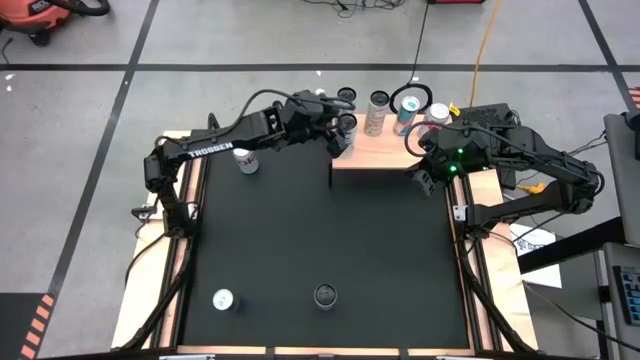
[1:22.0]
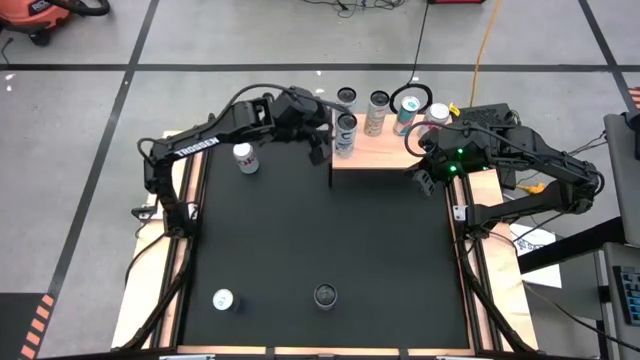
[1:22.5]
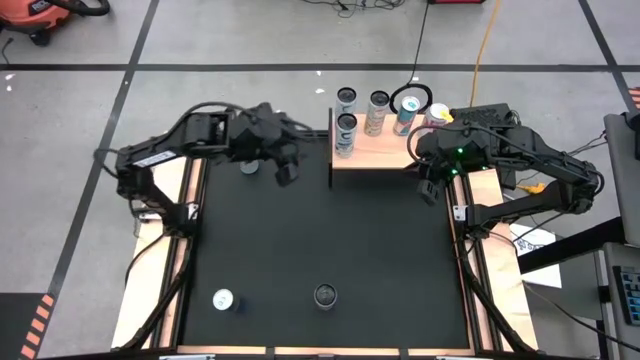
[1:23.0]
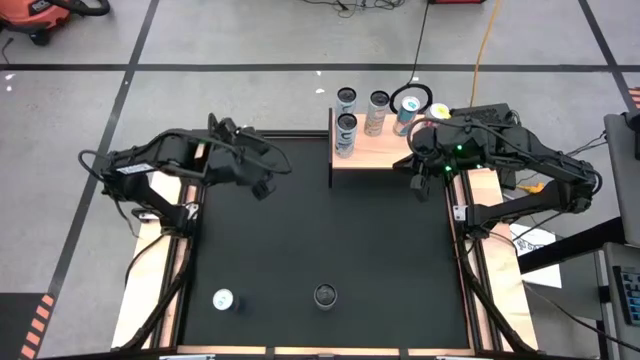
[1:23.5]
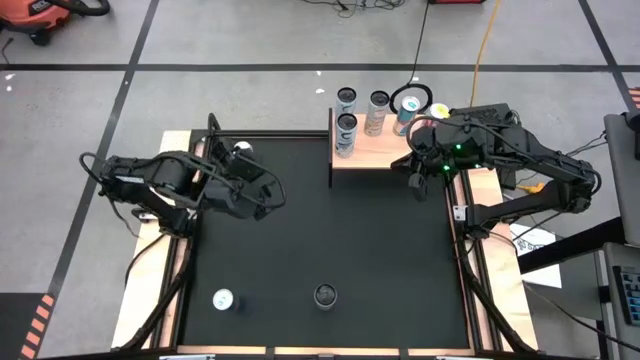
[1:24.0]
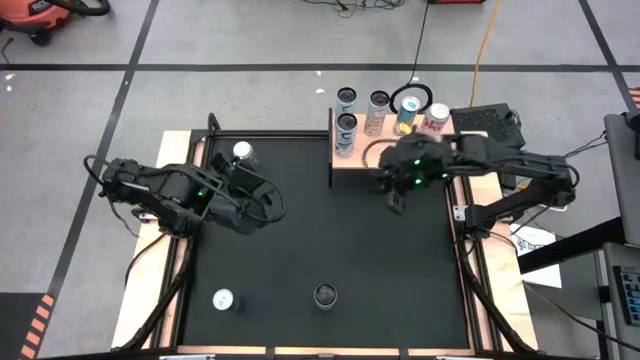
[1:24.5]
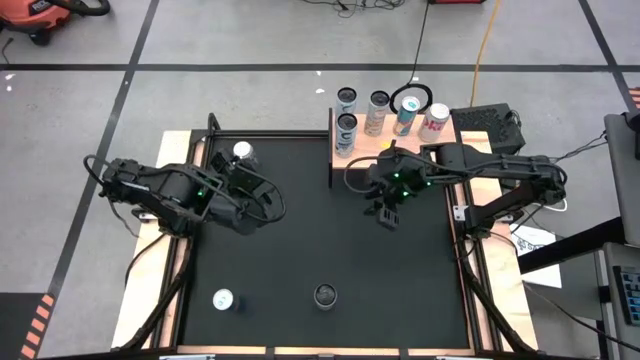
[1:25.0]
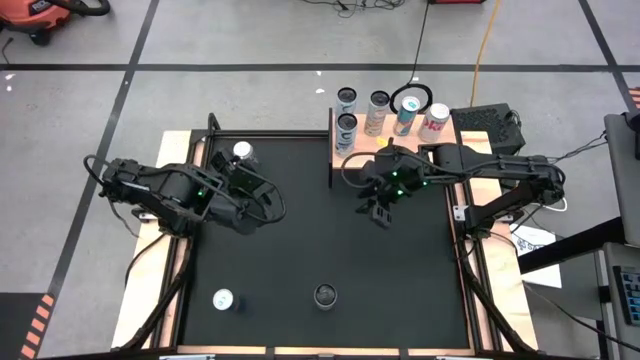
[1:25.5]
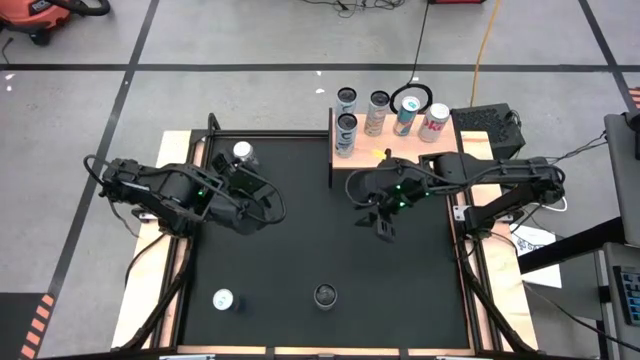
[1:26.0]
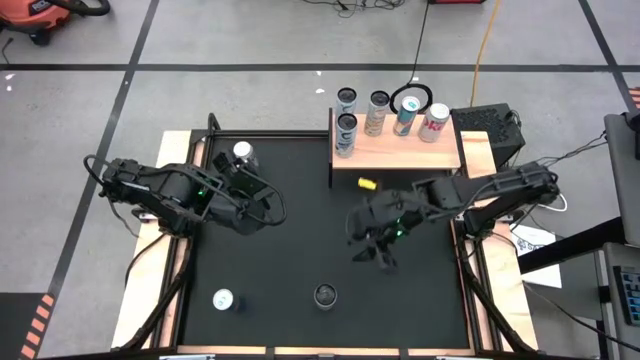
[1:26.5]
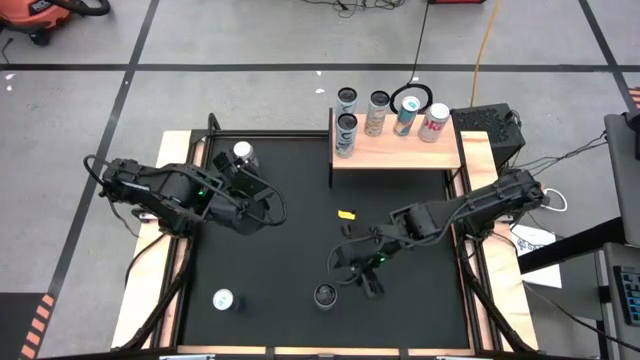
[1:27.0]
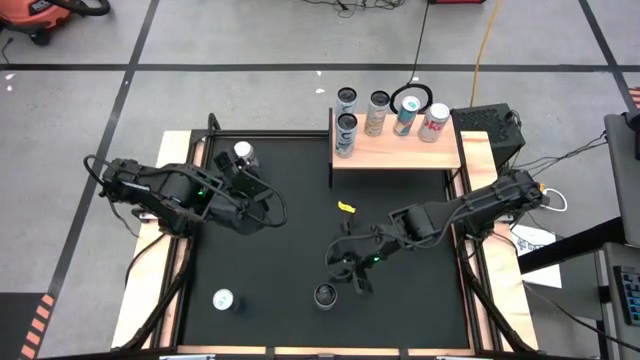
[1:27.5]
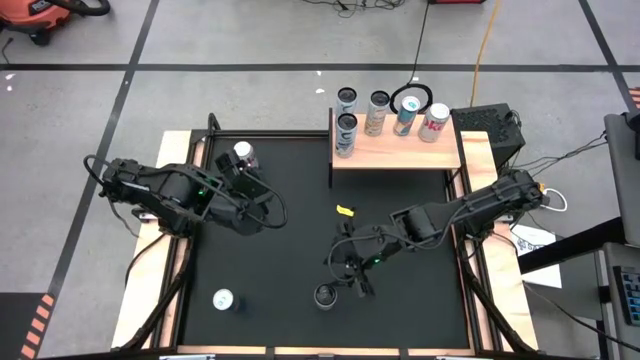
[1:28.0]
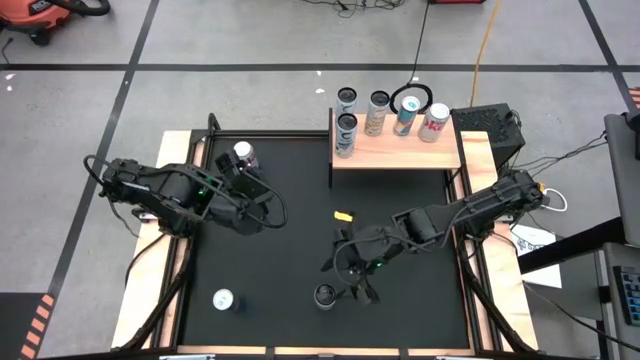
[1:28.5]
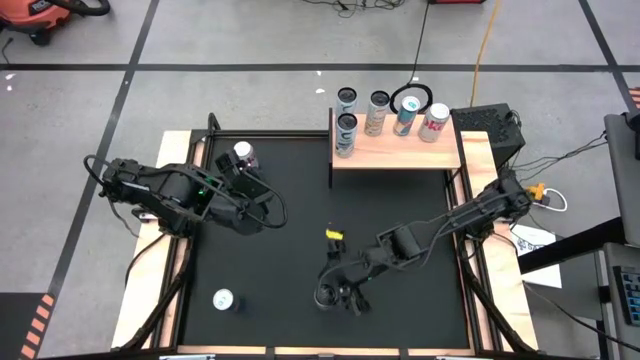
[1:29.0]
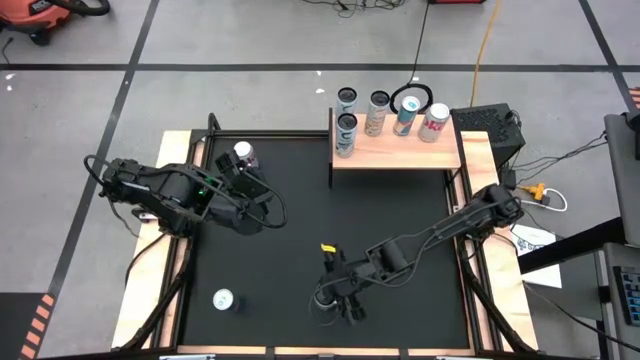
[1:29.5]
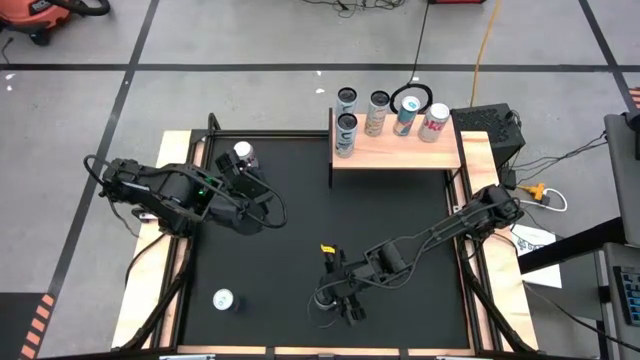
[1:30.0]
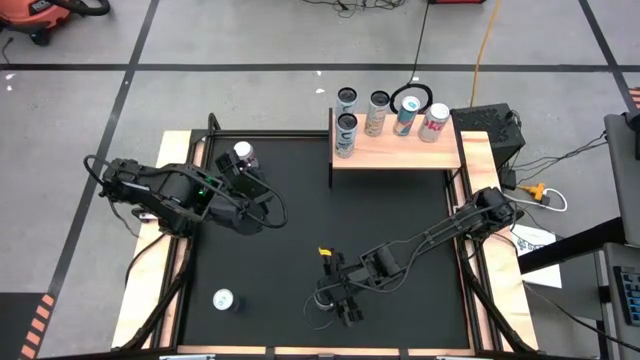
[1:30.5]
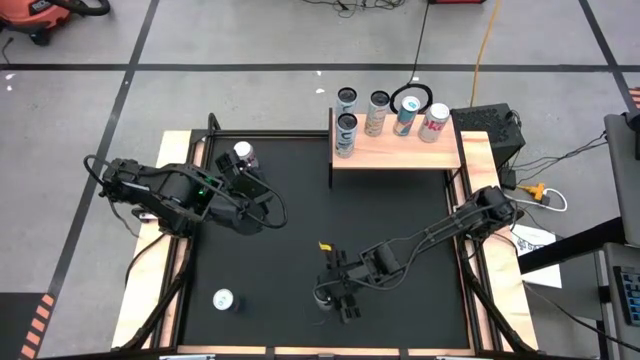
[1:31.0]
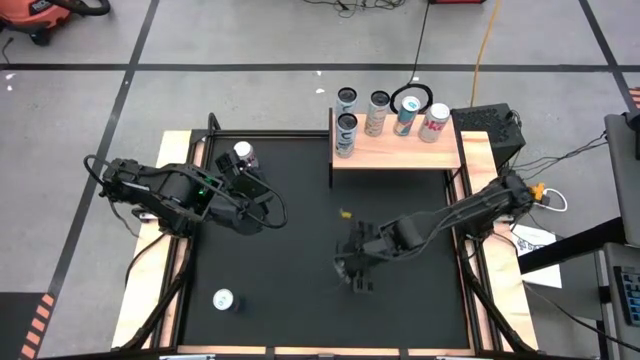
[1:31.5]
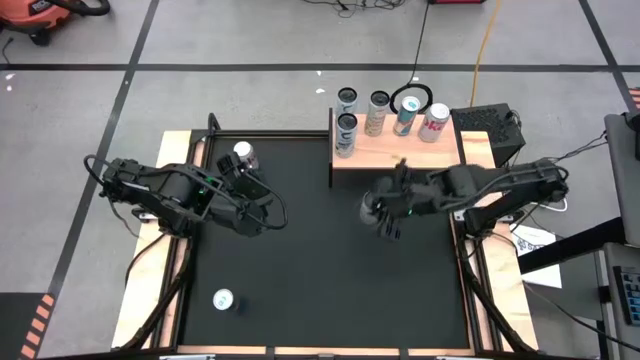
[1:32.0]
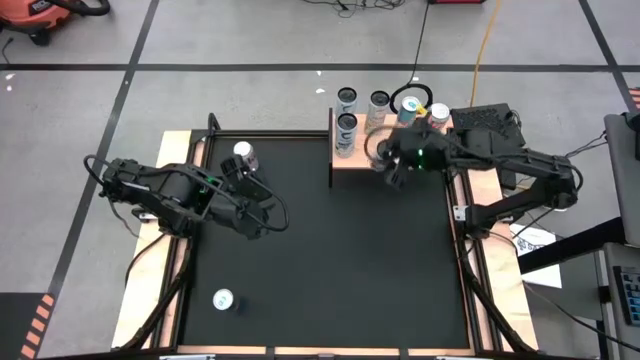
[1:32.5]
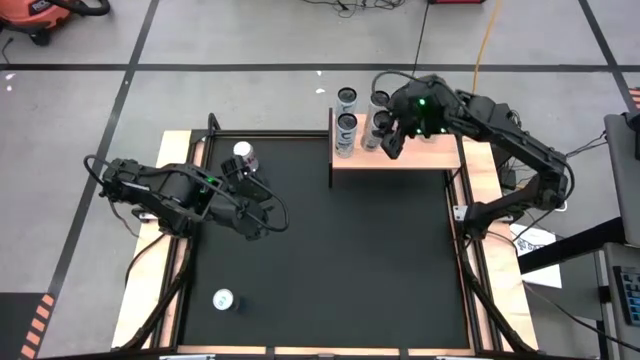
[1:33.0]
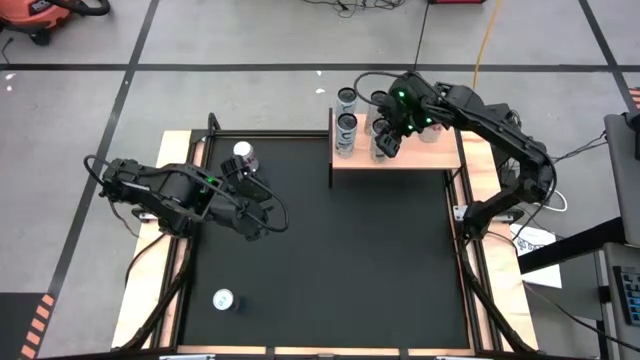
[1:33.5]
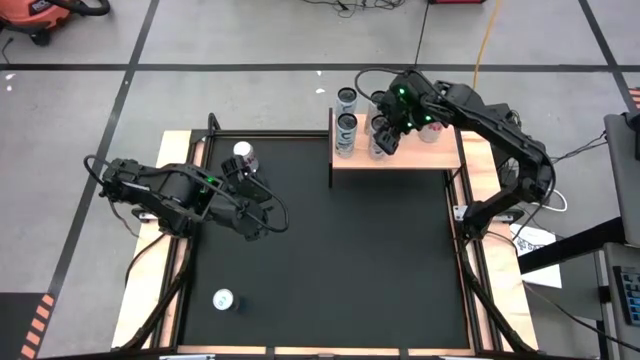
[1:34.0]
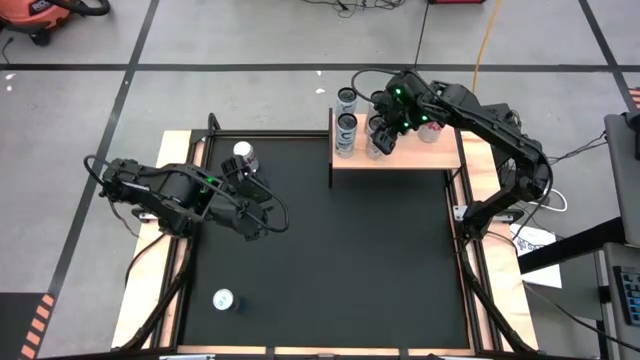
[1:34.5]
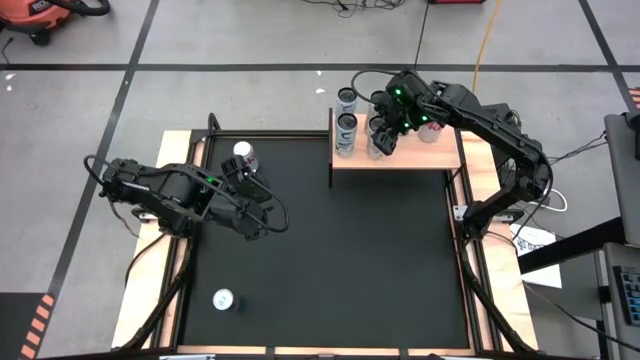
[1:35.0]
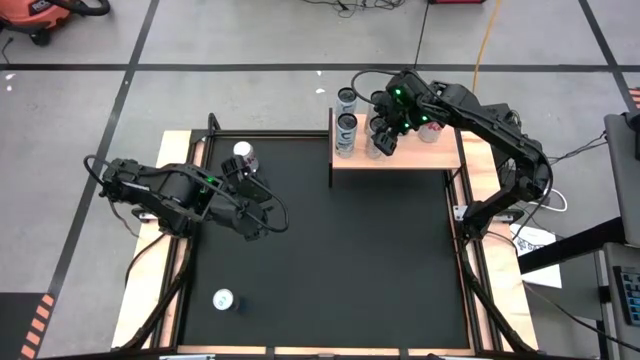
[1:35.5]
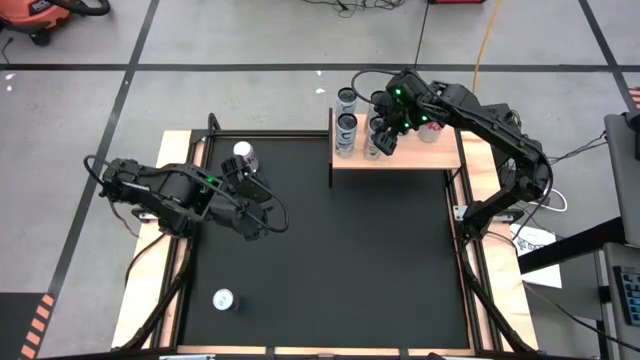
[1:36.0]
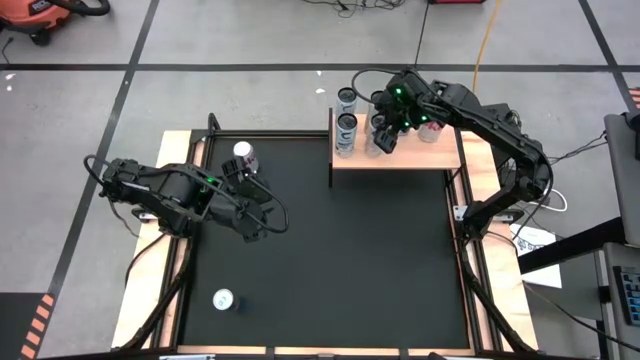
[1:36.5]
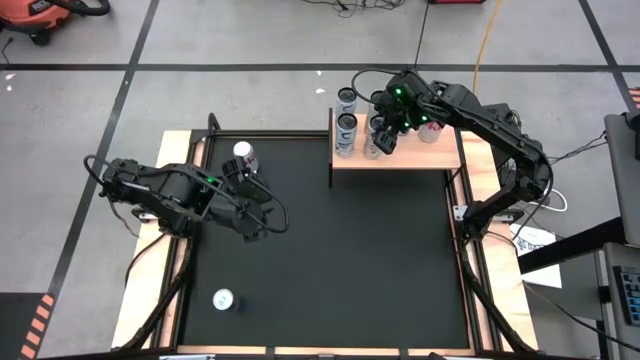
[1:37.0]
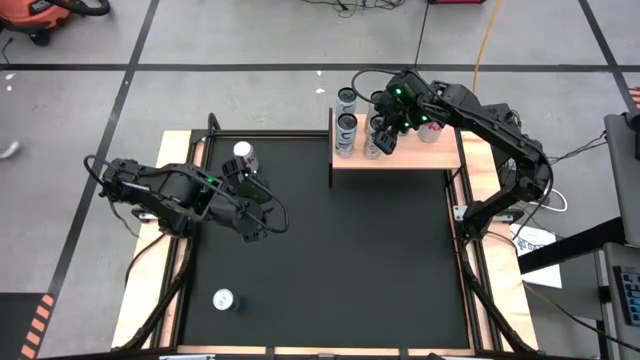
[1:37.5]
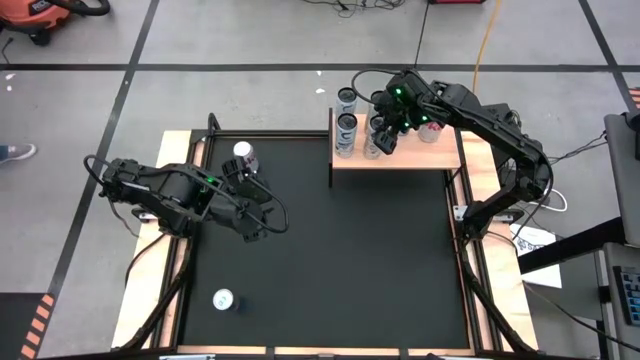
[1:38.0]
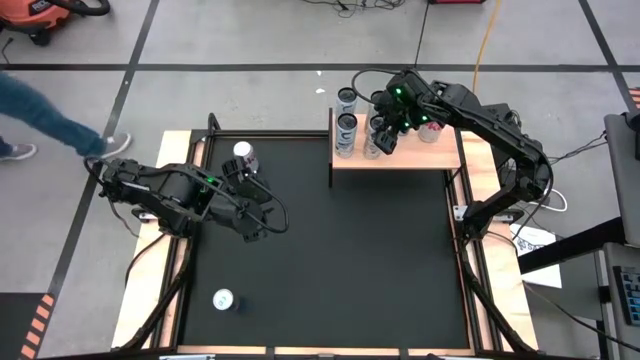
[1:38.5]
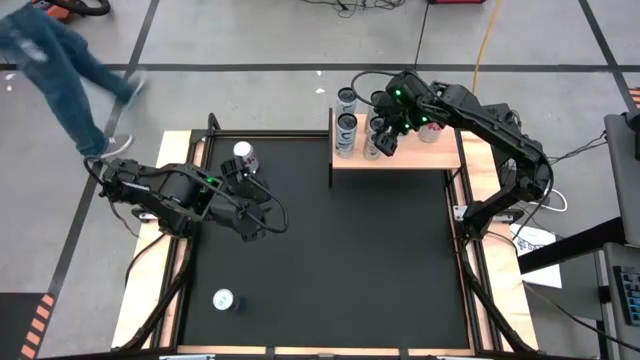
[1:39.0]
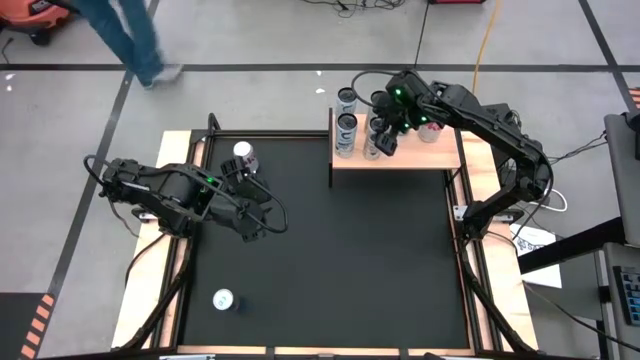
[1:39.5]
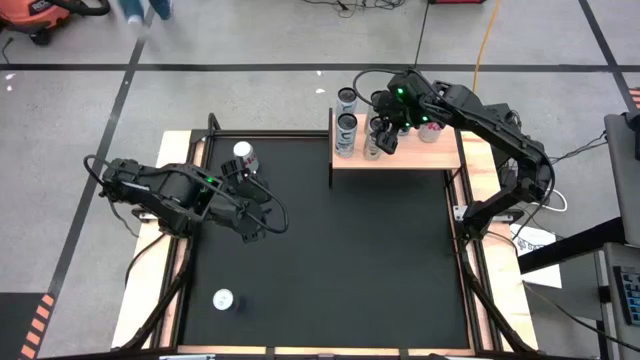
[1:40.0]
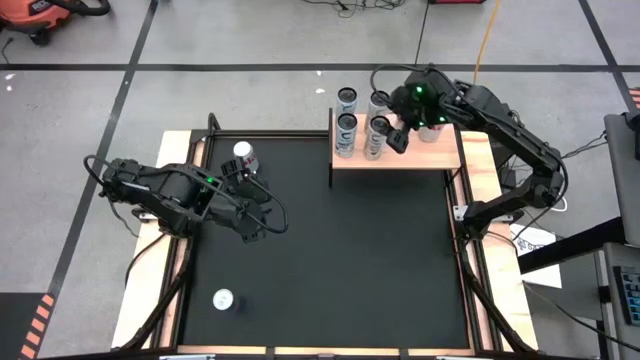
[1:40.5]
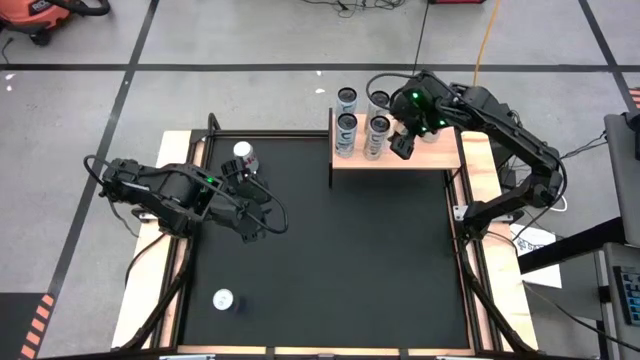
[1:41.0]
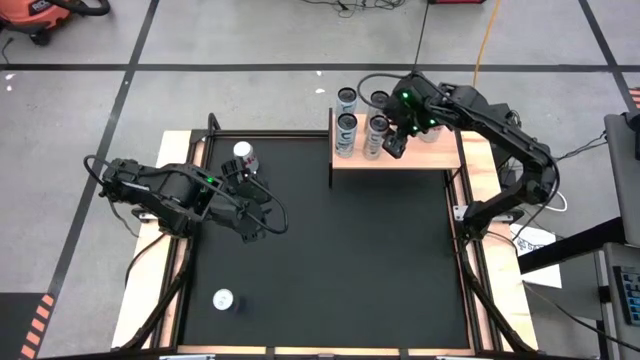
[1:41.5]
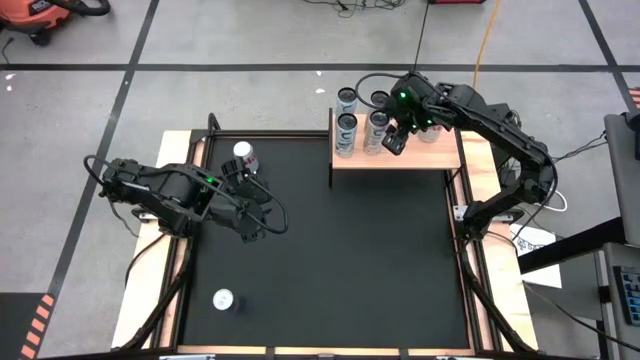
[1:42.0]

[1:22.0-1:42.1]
Task: Place canned beverage on shelf
Put the white-yellow soda can on the shelf aligned with the other white-yellow soda can

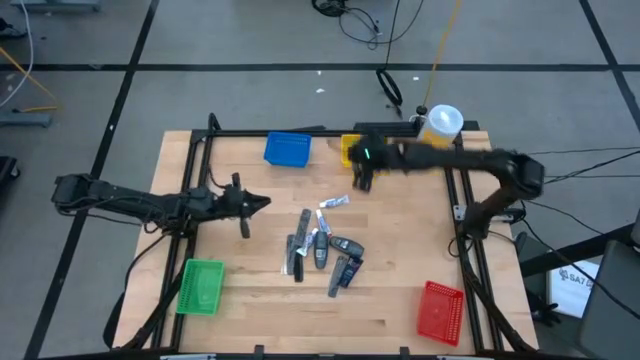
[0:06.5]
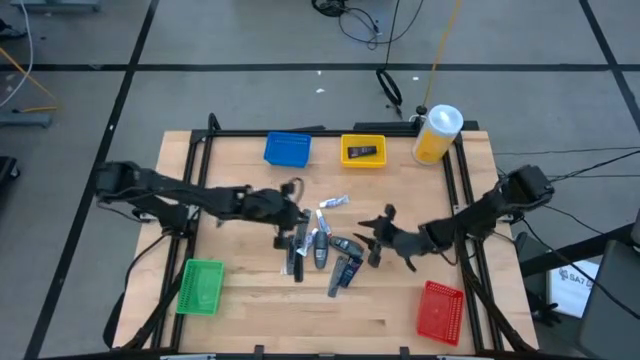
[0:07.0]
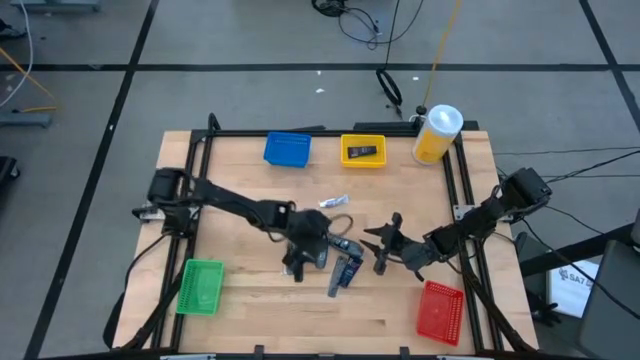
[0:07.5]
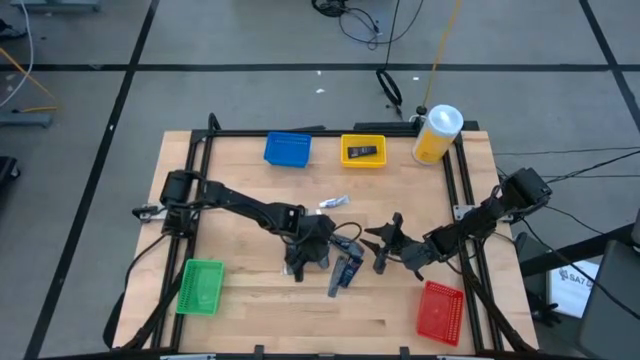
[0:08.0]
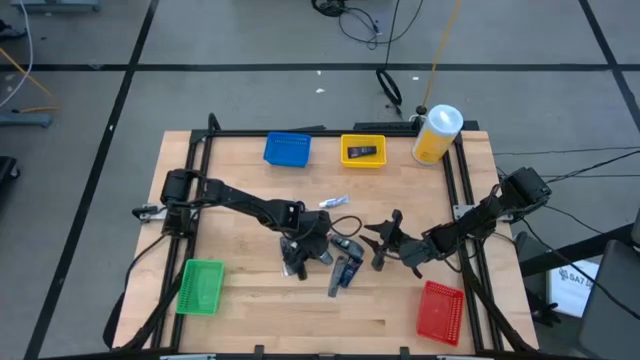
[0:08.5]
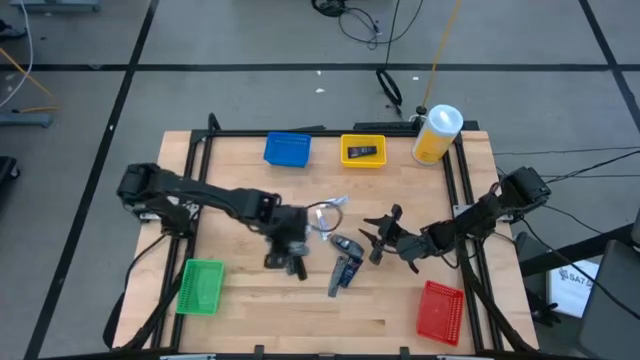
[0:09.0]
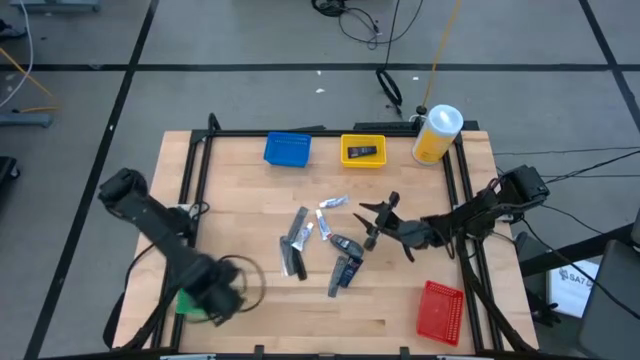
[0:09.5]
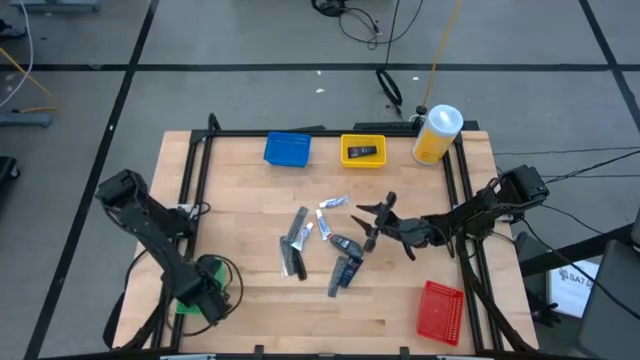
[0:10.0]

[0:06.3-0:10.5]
Task: Pick & Place Travel size toiletries
Put the gray deodorant into the green bin
